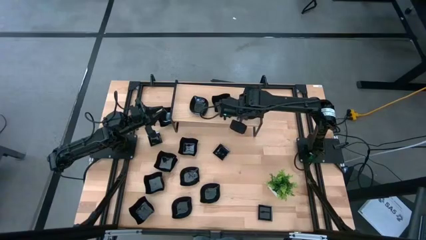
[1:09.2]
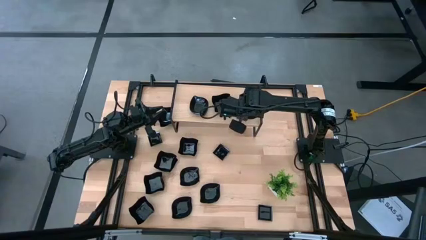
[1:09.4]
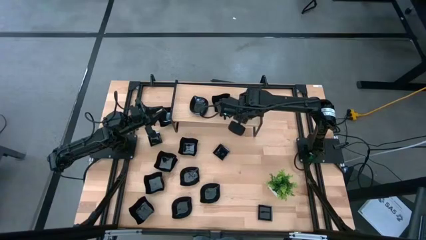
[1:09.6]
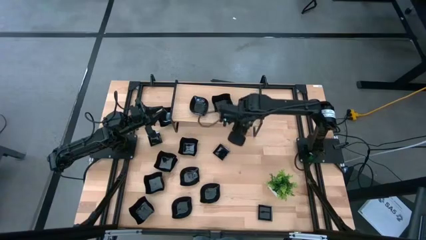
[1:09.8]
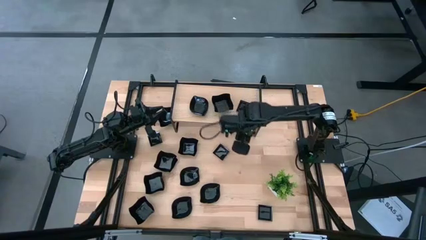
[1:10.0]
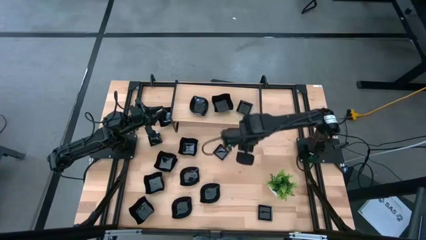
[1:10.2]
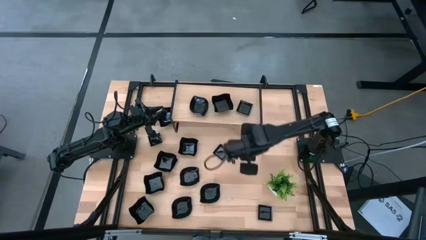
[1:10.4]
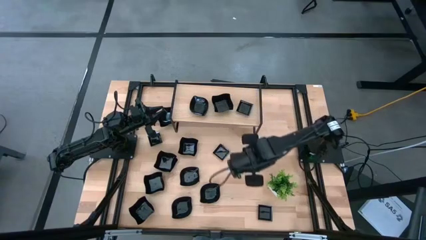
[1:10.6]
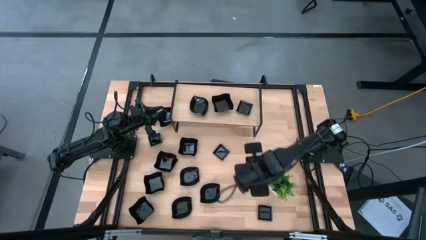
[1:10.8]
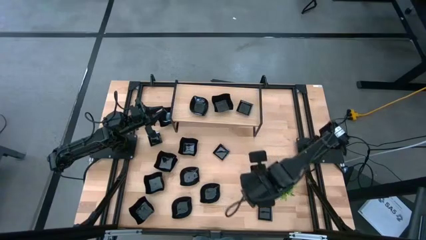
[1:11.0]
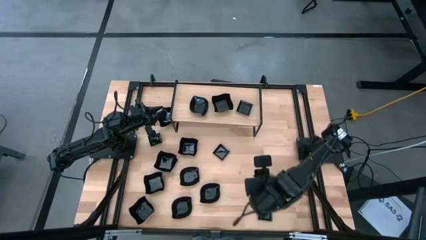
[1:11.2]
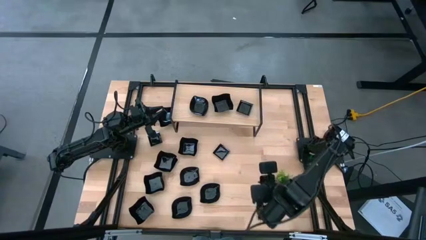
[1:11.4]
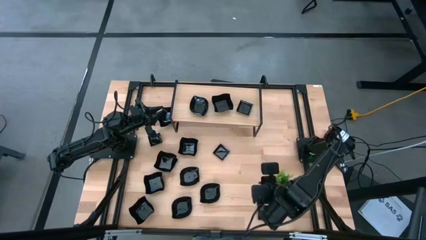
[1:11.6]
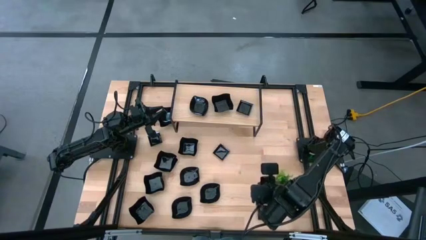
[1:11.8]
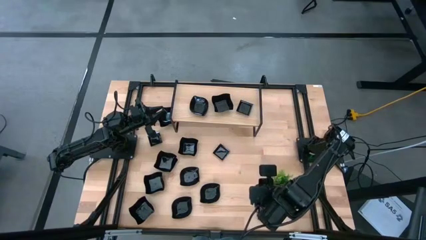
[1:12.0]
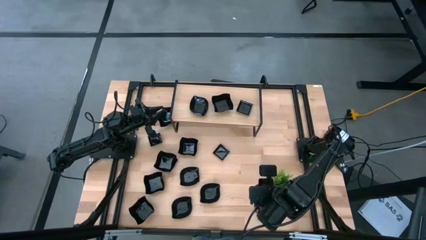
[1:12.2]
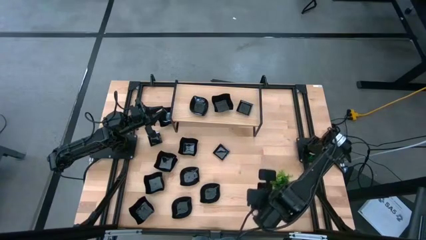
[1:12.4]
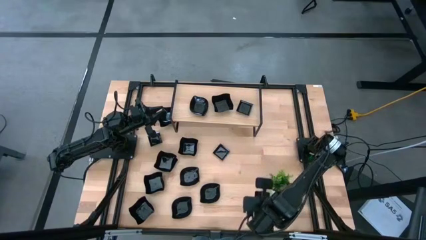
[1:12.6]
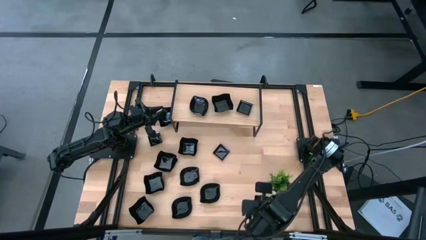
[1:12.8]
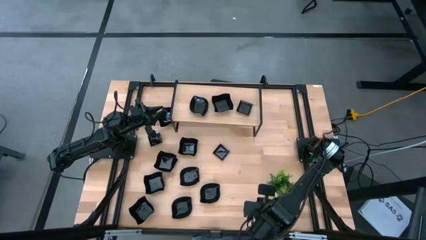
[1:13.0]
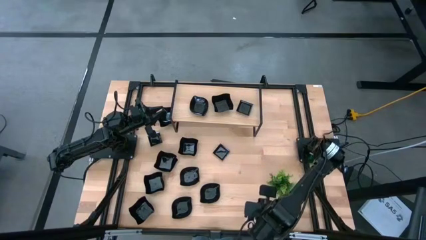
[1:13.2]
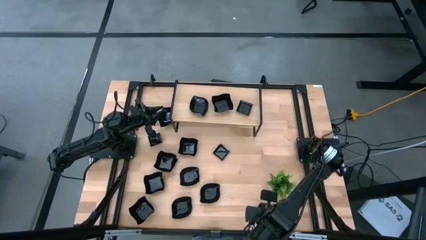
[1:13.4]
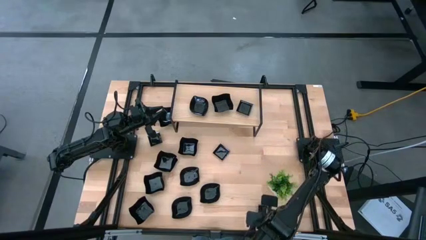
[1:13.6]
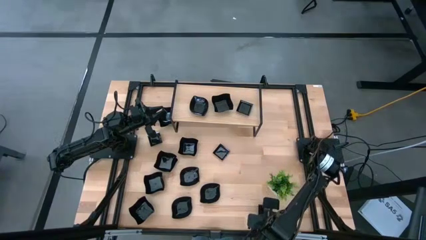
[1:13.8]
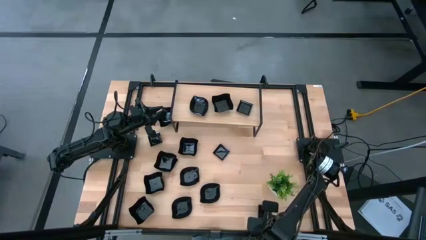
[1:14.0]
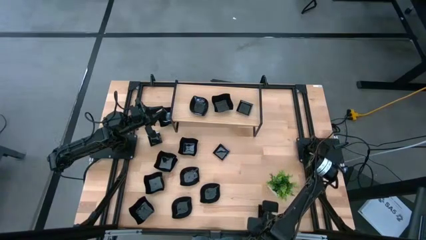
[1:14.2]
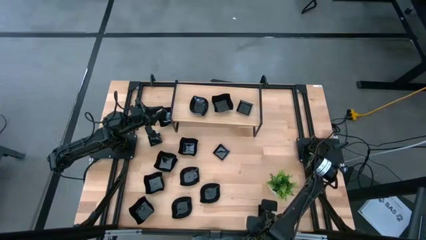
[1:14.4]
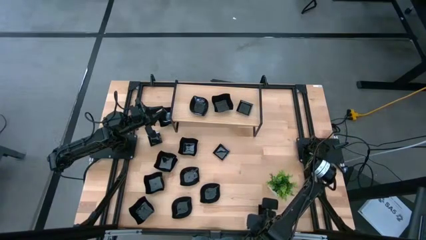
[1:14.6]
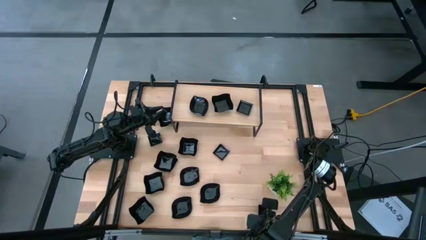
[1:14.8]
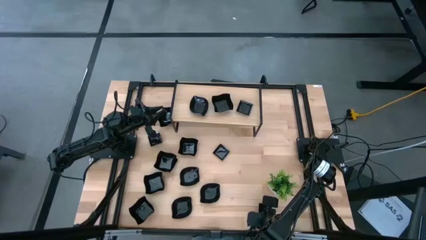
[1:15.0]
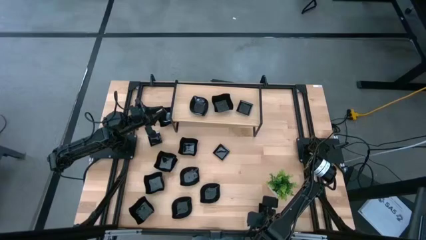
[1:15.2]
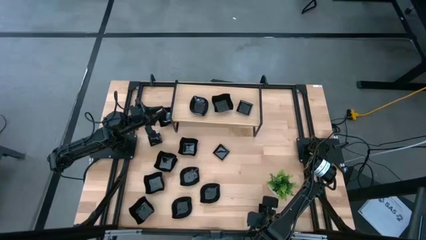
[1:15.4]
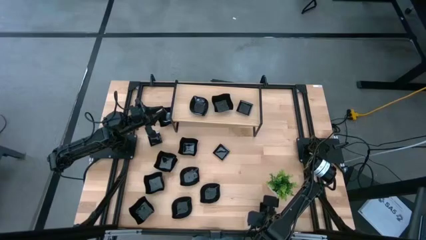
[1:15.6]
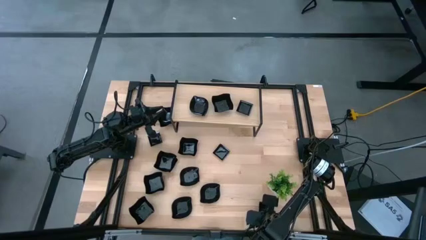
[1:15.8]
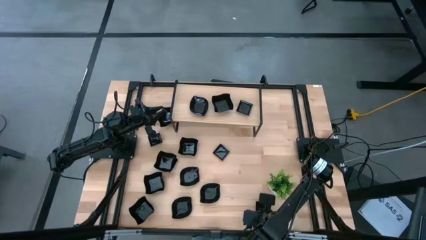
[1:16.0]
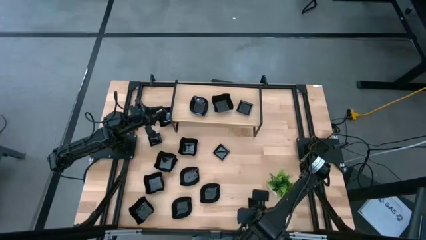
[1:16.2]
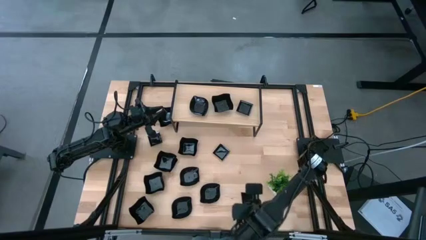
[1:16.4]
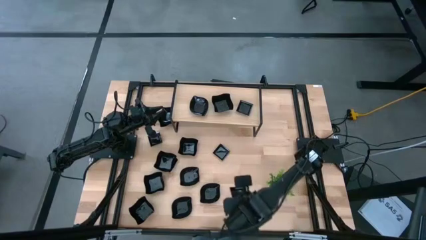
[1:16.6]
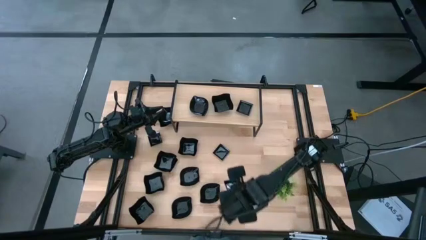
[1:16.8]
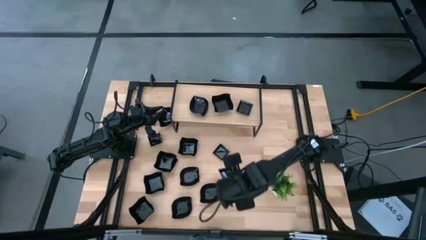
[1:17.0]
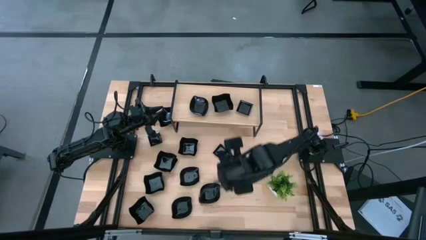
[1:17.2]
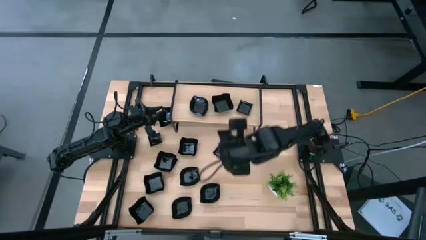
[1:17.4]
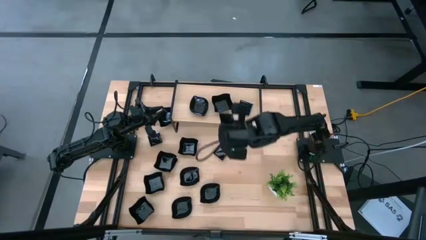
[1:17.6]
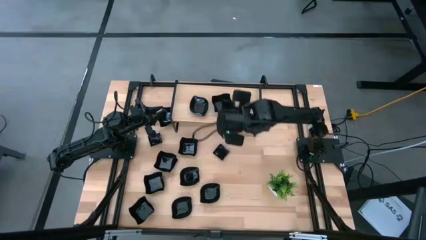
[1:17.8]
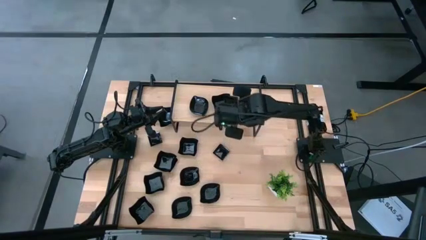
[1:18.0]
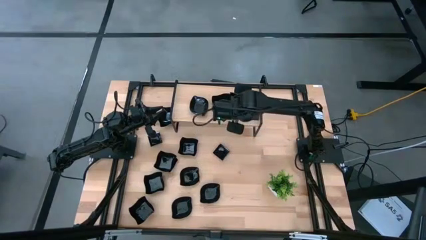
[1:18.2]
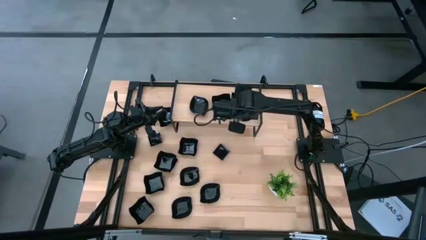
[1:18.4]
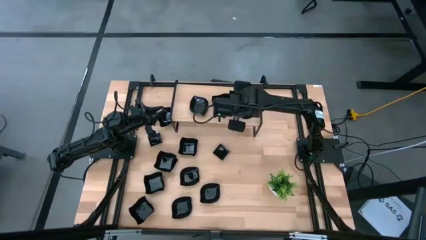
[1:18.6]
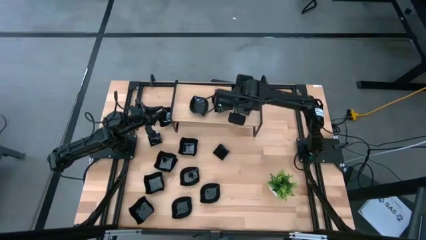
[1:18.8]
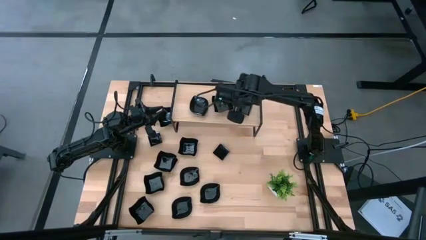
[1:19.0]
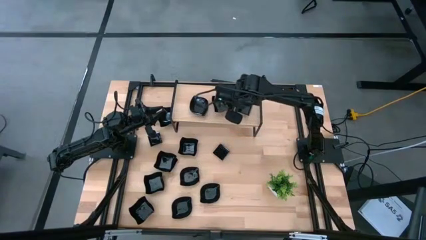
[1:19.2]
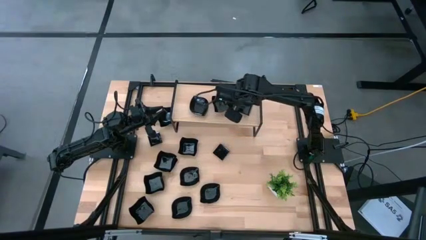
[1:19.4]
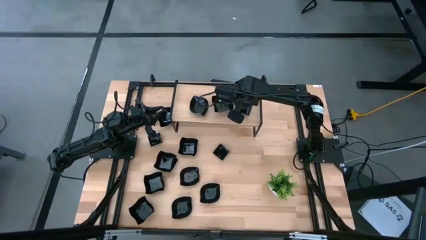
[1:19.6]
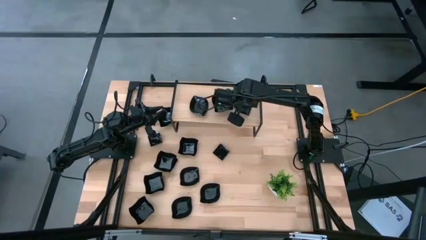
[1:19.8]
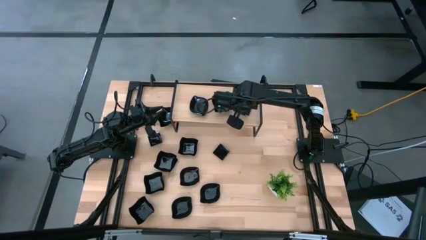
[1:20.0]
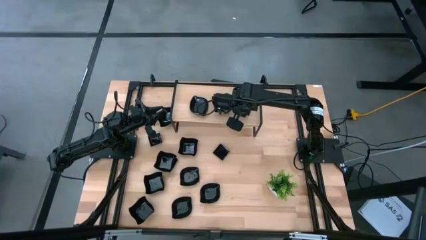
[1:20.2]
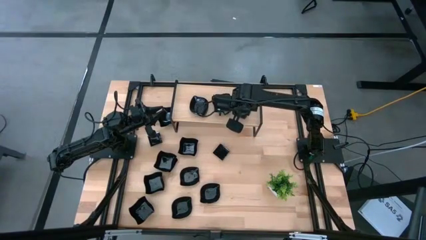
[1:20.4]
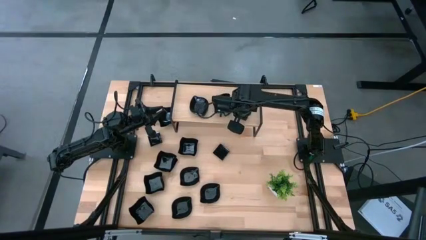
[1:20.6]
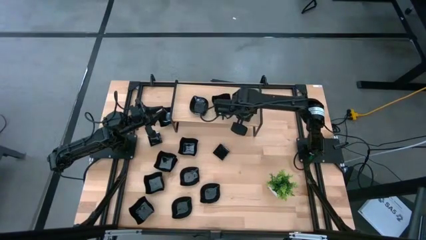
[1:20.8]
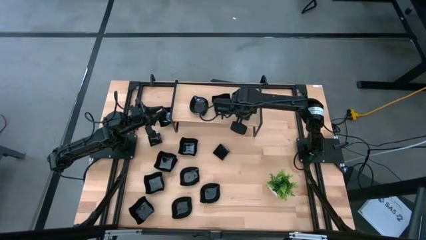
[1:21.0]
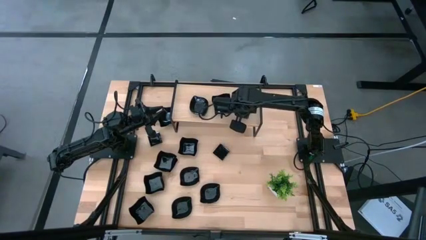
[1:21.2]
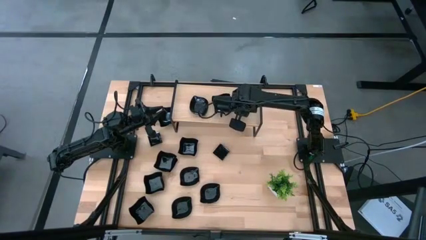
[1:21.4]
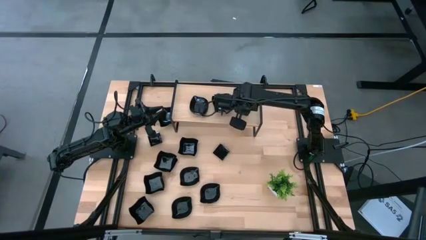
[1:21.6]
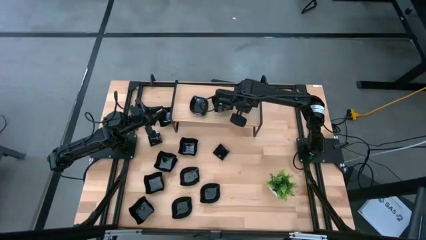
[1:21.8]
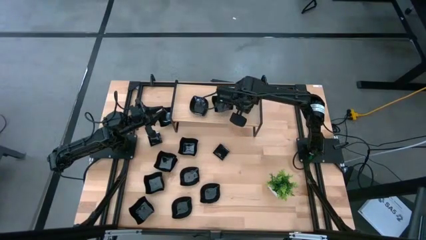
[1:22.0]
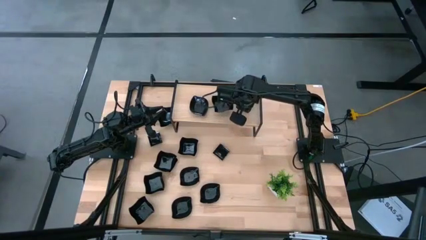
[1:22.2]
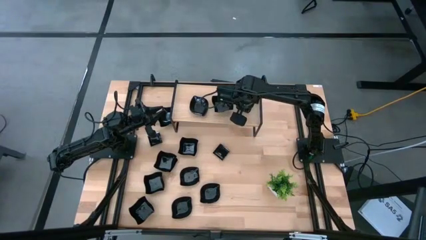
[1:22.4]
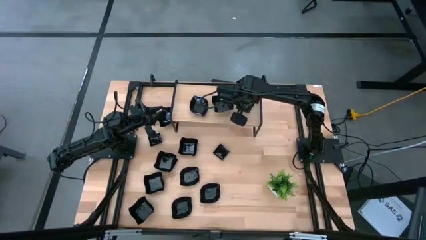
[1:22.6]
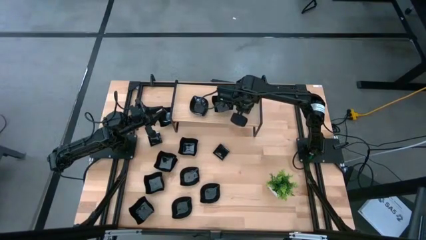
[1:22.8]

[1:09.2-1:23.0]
Task: Pick & Place Mini shaped plates
Stack the square plate on top of the square plate on the shelf
